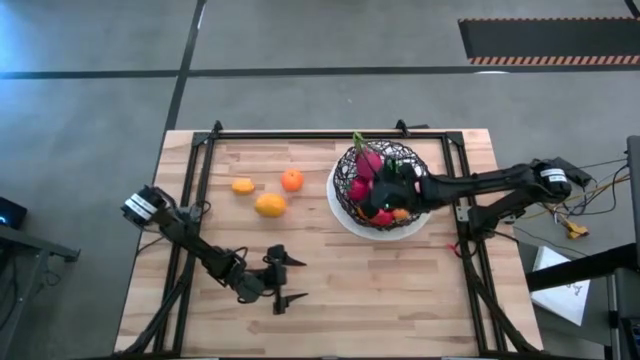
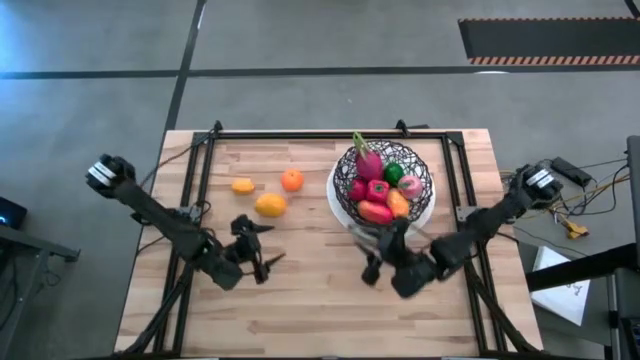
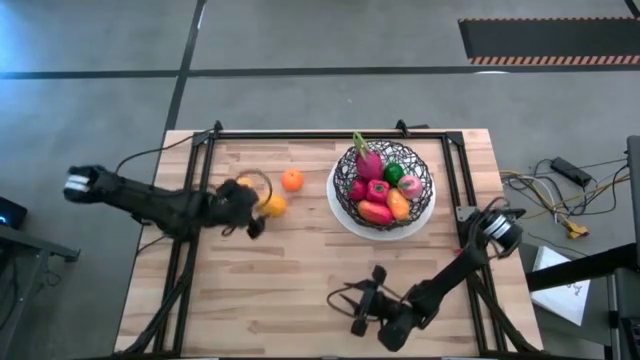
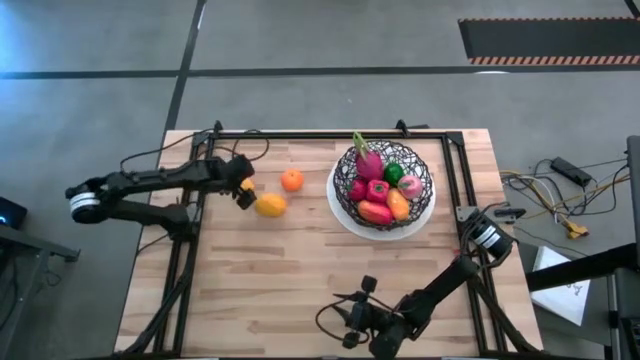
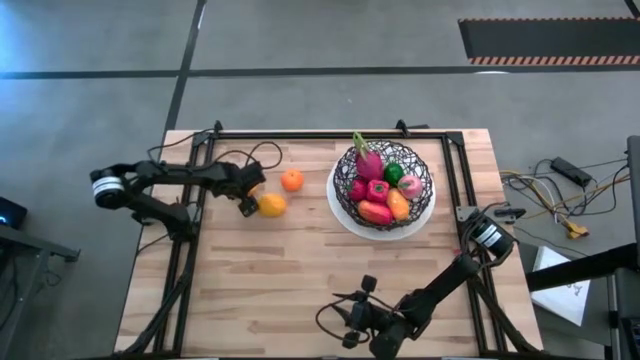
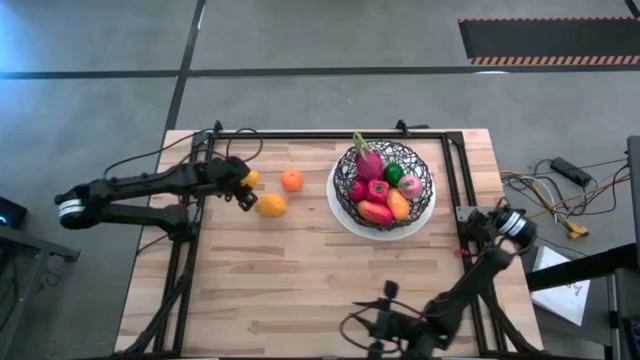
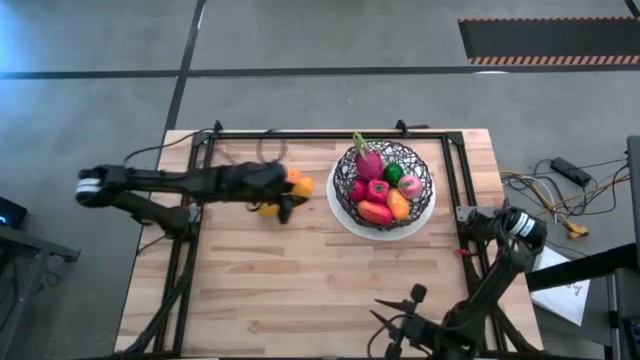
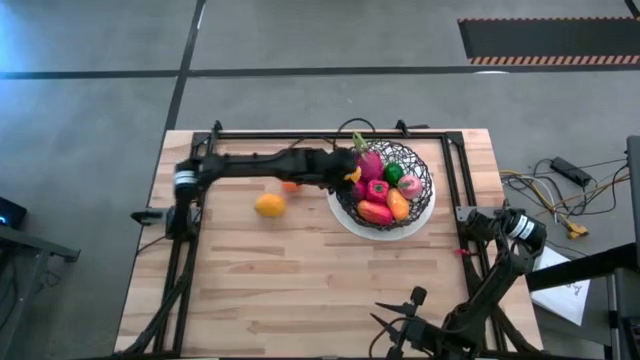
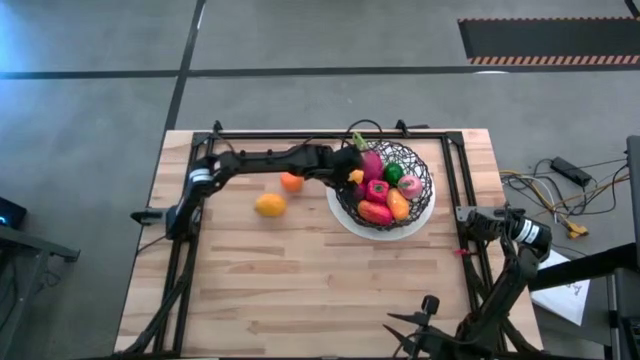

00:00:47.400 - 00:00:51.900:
Task: Build produce basket
Put the left lemon into the black basket

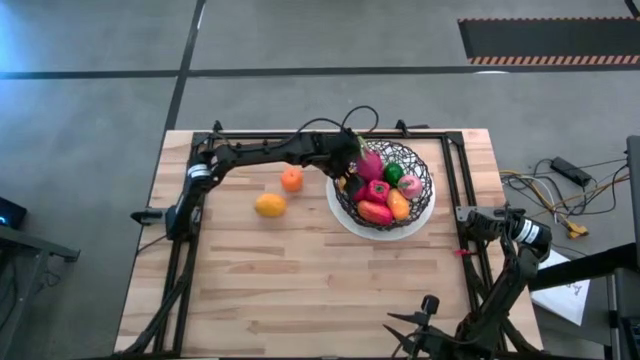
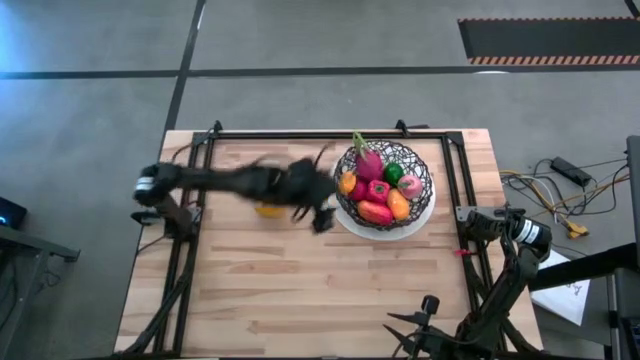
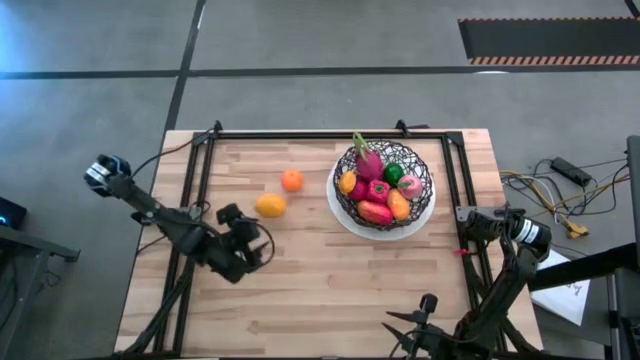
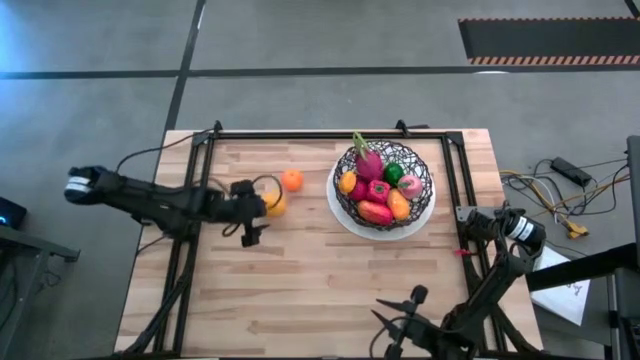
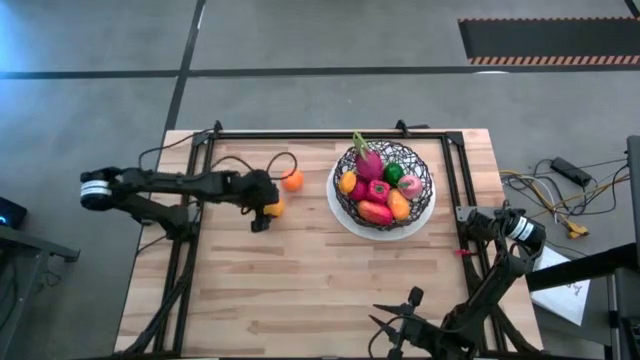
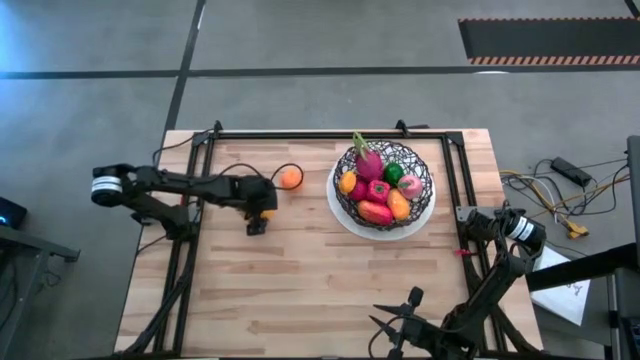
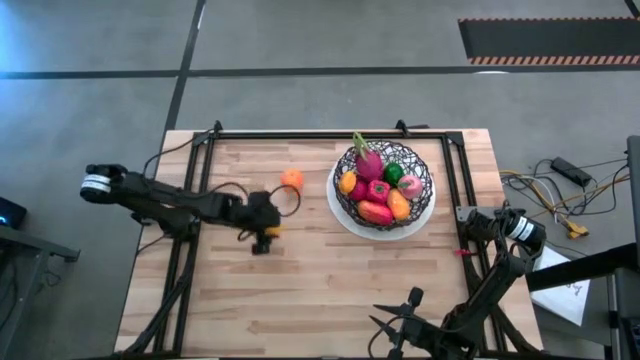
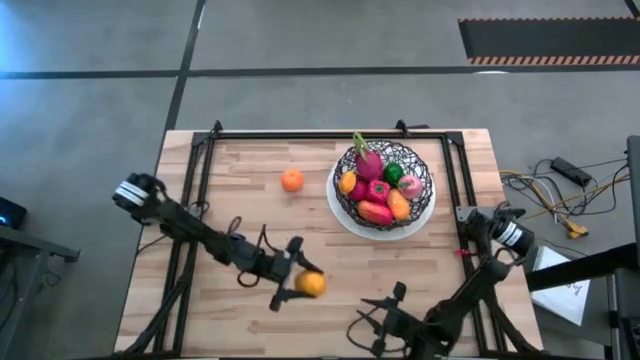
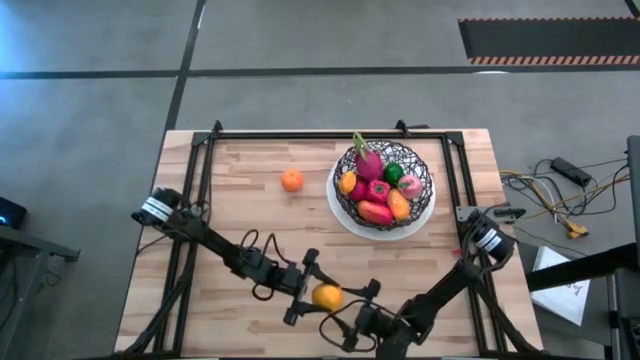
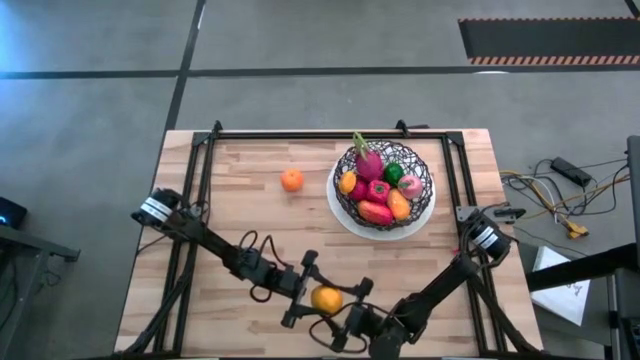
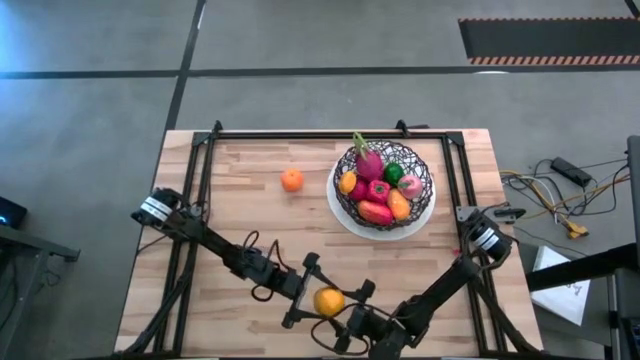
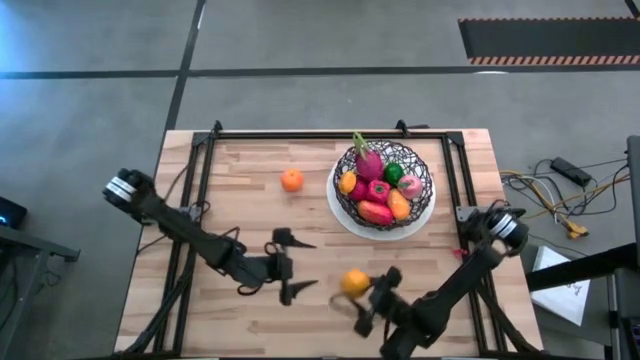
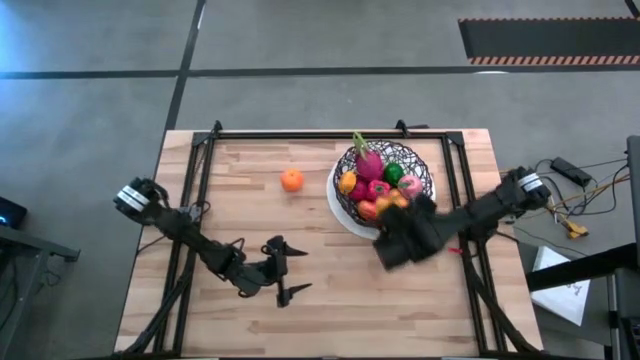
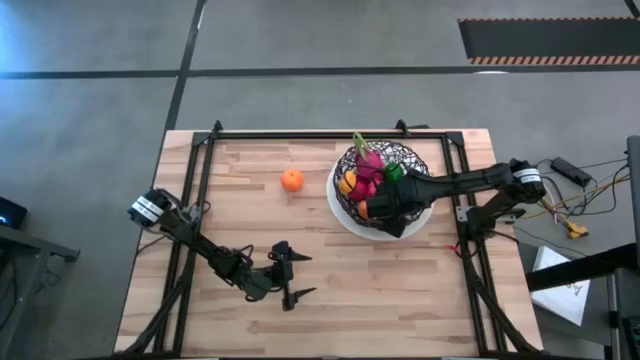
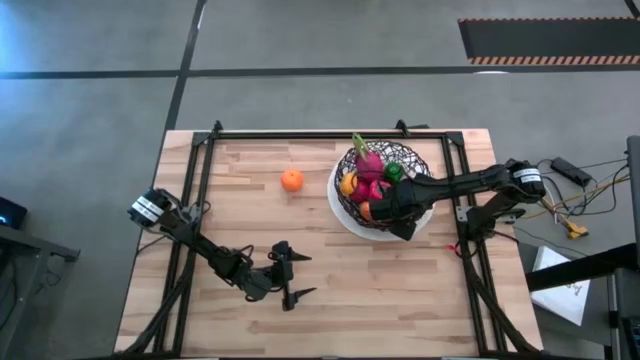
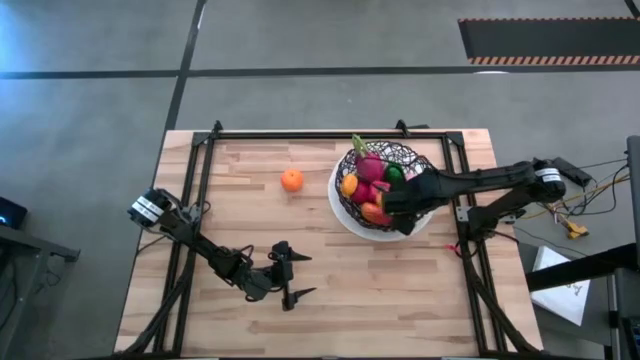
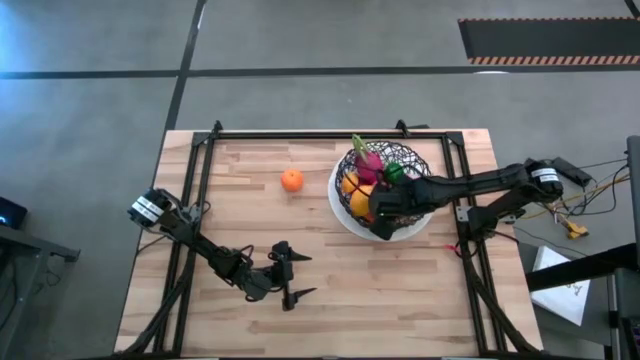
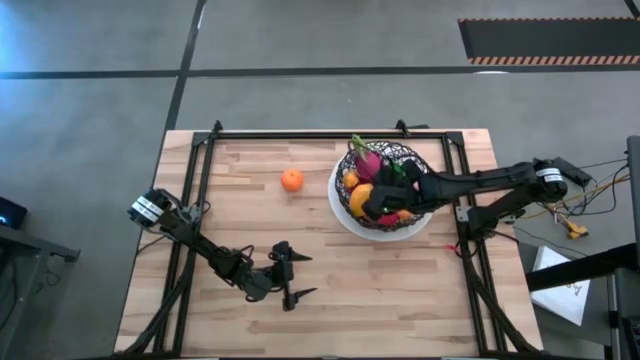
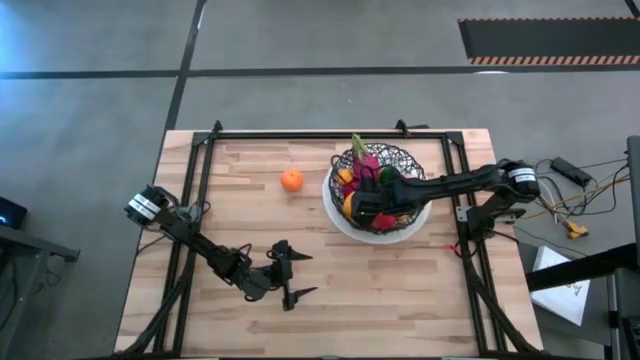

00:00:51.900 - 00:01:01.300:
Put the lemon into the black basket

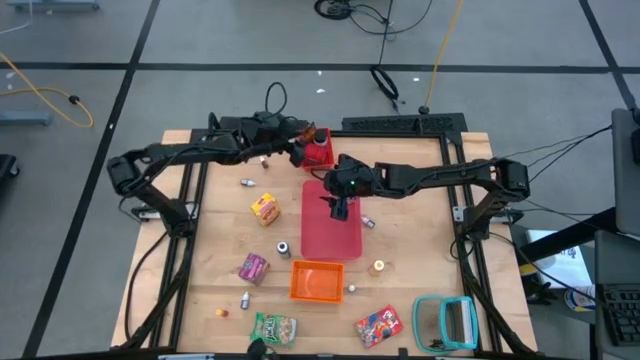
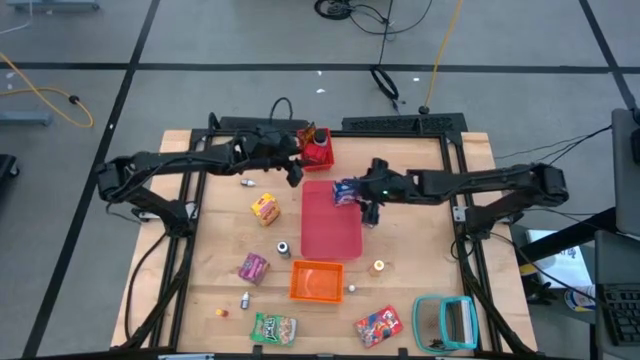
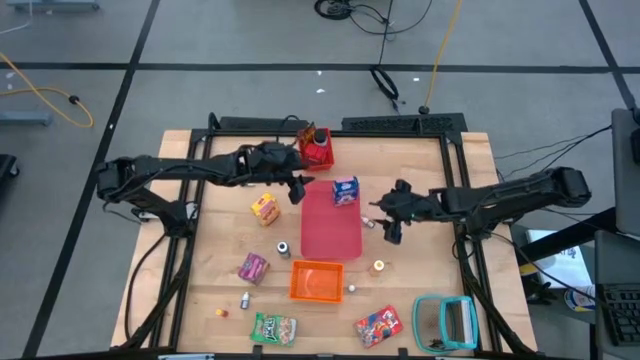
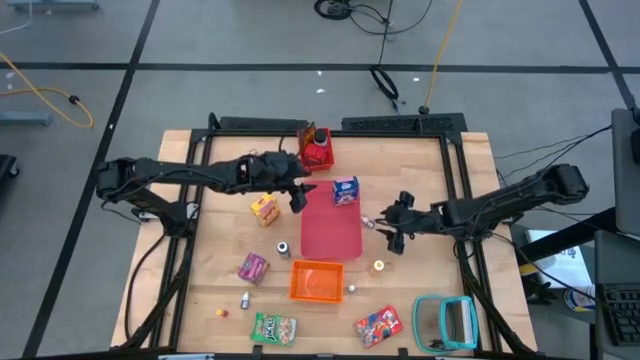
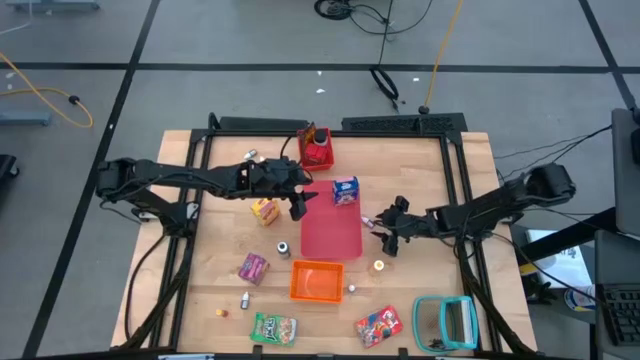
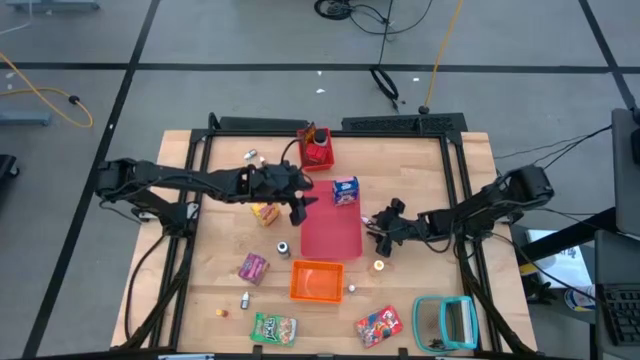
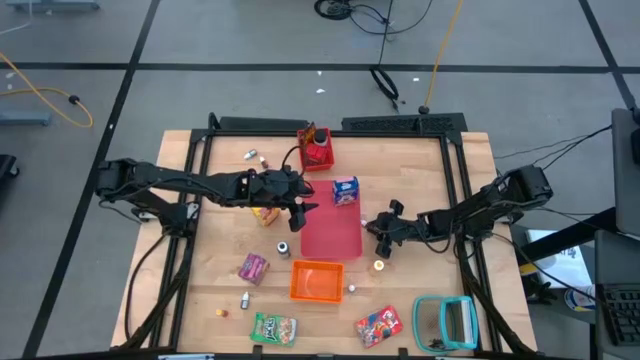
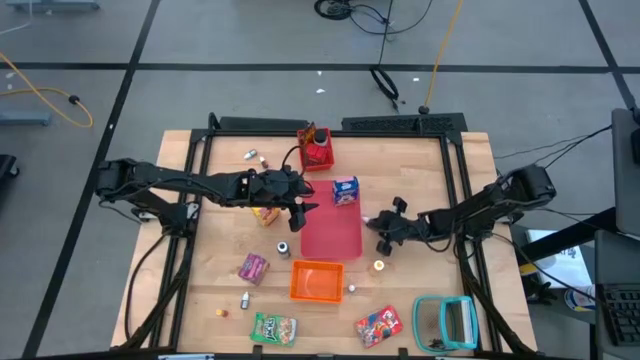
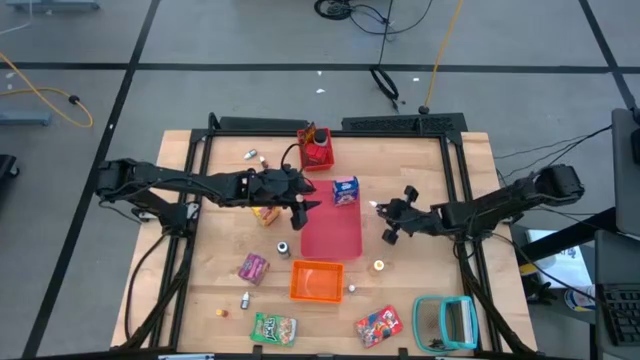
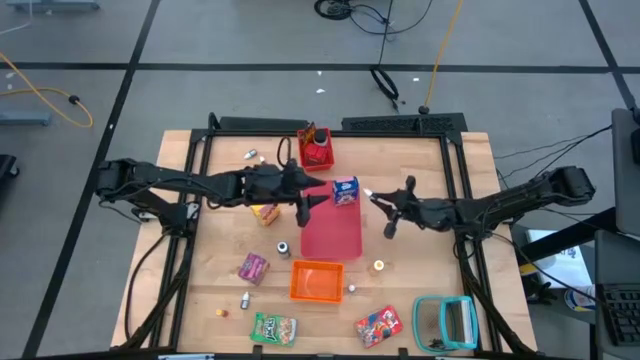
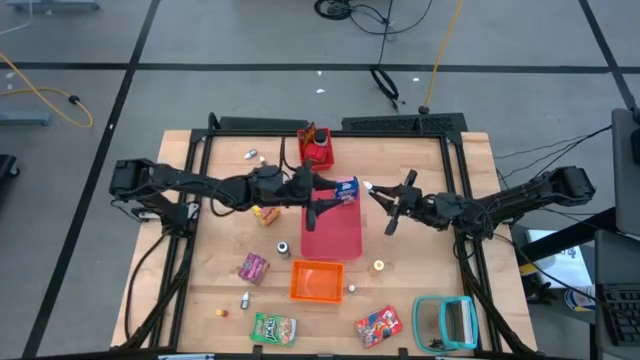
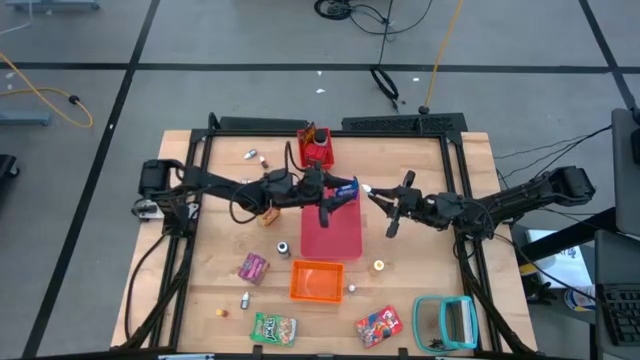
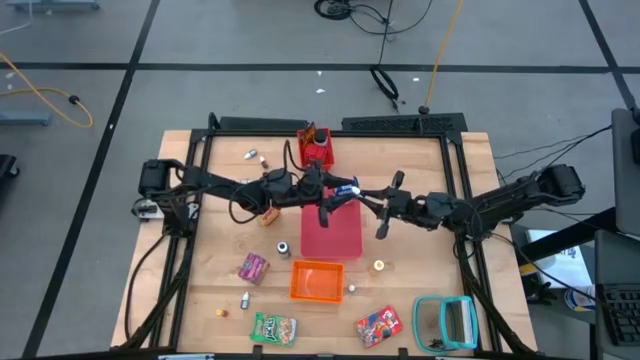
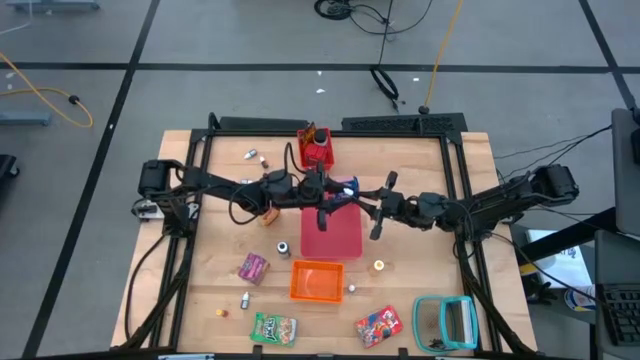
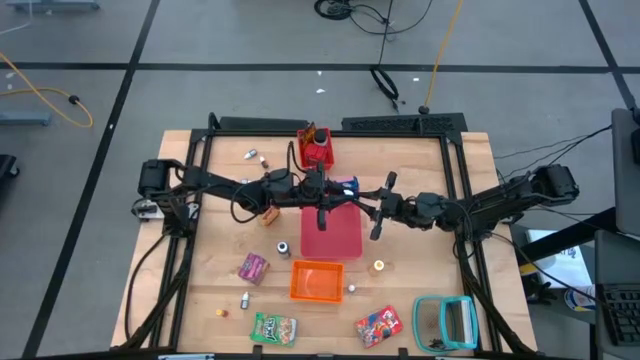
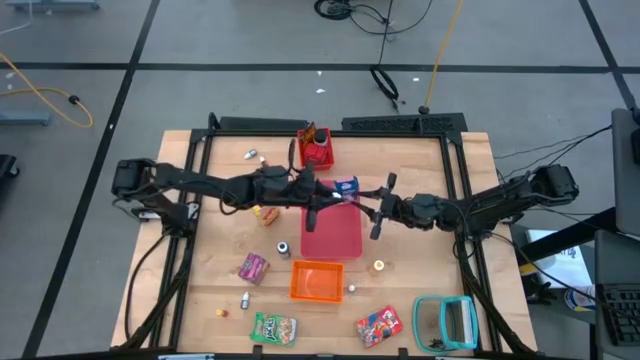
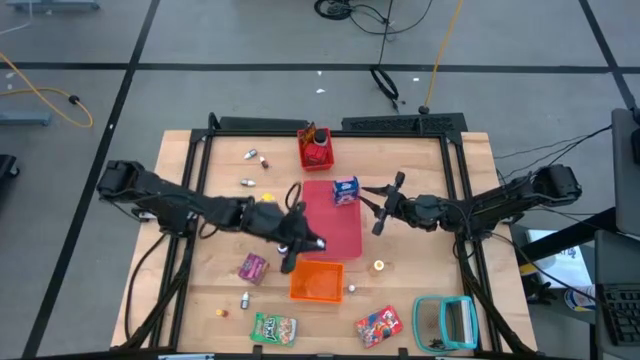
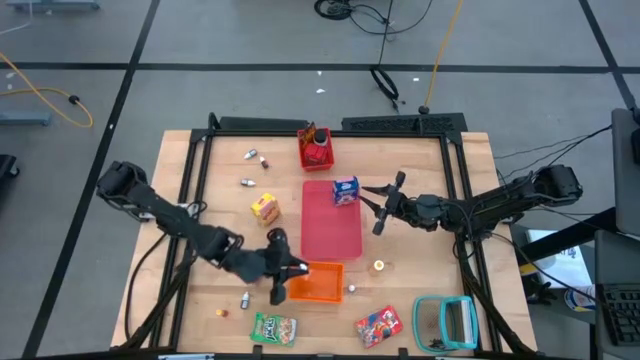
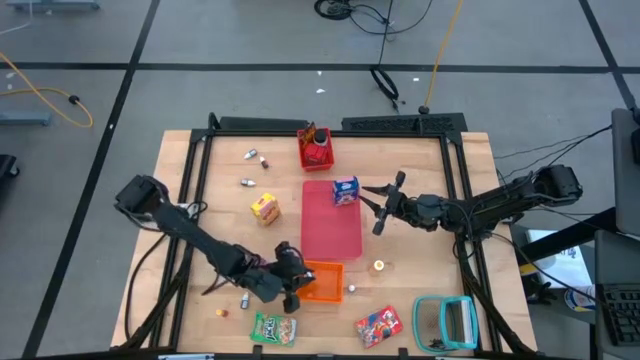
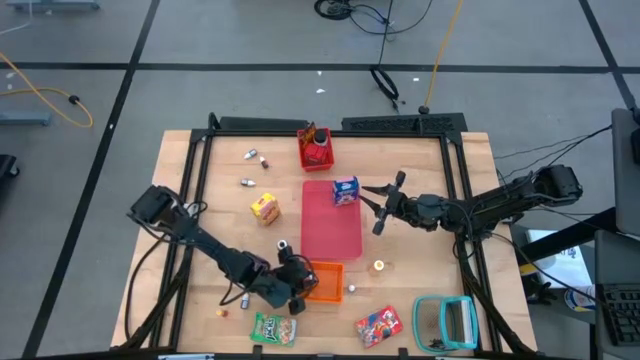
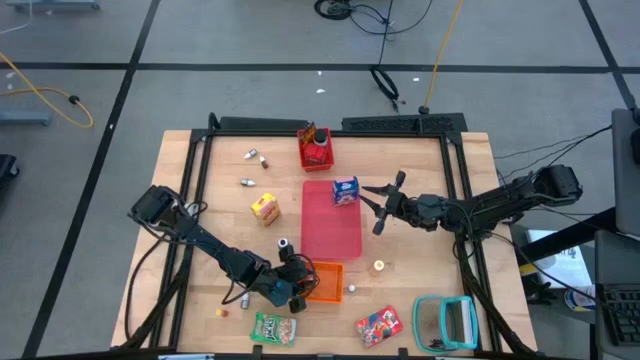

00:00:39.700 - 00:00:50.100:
Task: Pick & Place Kitchen Items
Put the small black food coloring bottle into the orange bin
